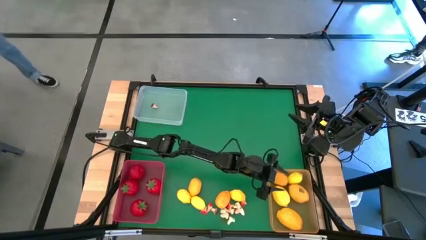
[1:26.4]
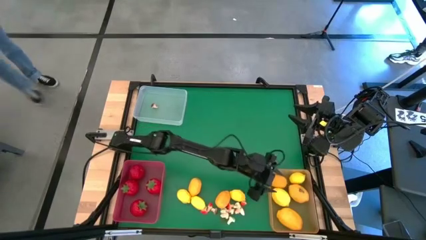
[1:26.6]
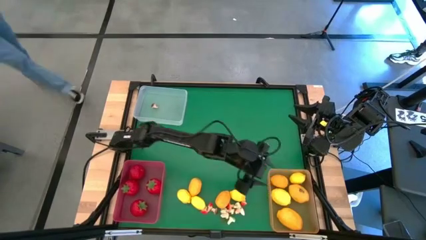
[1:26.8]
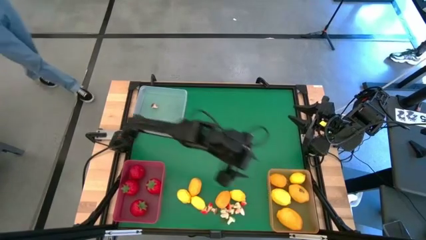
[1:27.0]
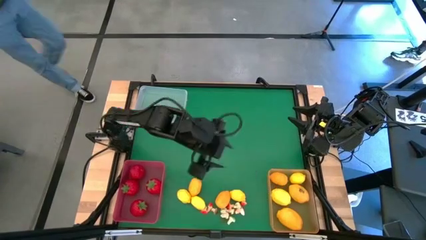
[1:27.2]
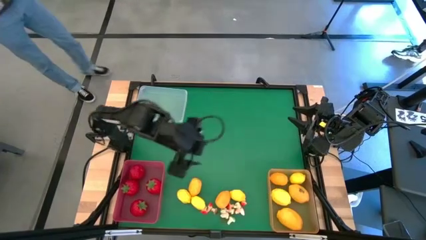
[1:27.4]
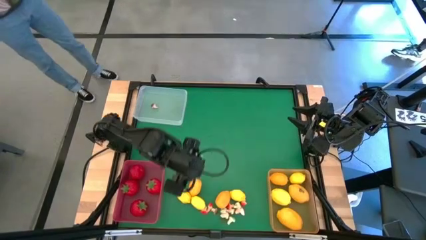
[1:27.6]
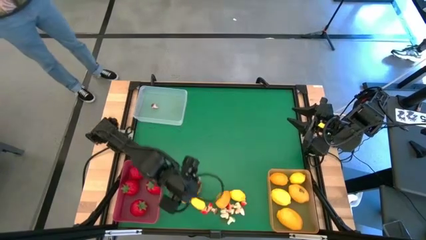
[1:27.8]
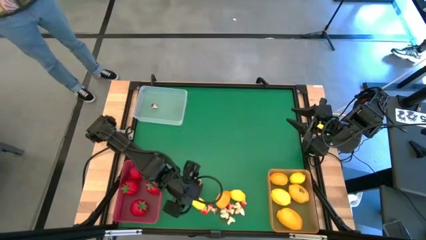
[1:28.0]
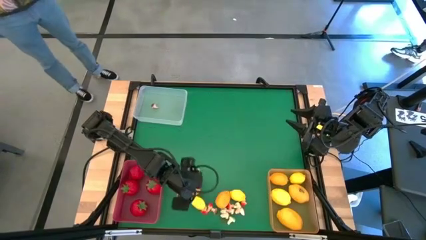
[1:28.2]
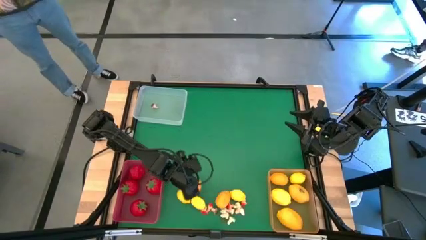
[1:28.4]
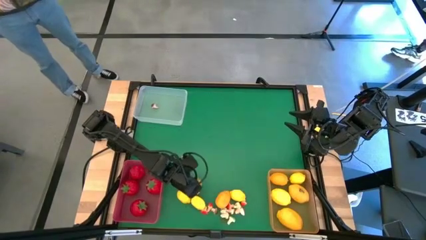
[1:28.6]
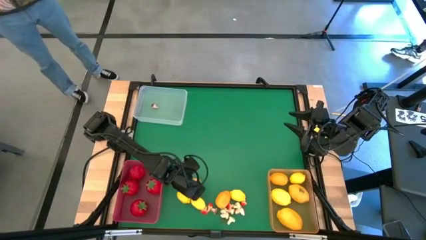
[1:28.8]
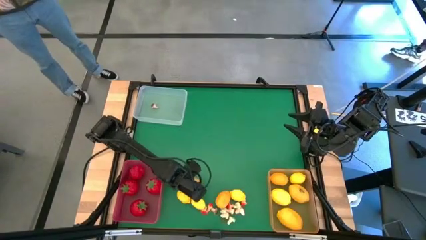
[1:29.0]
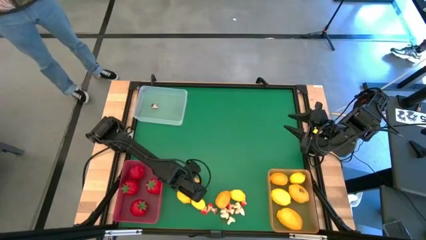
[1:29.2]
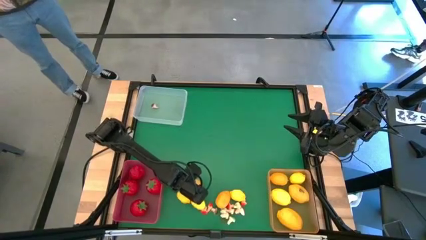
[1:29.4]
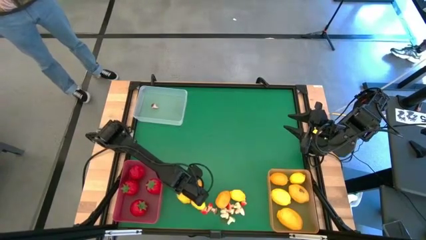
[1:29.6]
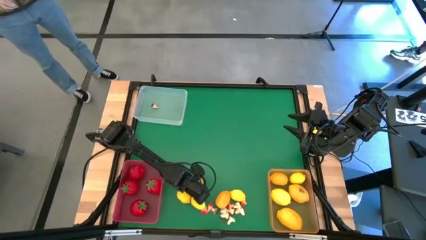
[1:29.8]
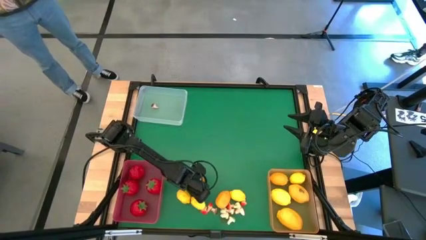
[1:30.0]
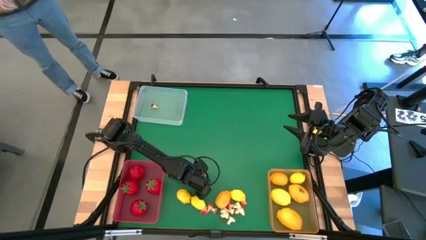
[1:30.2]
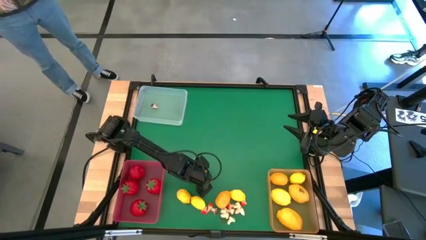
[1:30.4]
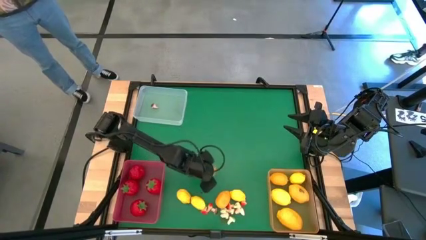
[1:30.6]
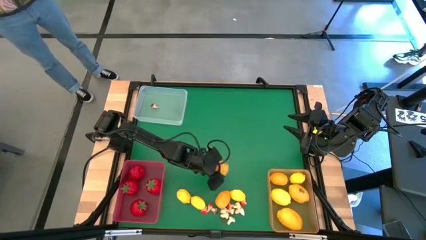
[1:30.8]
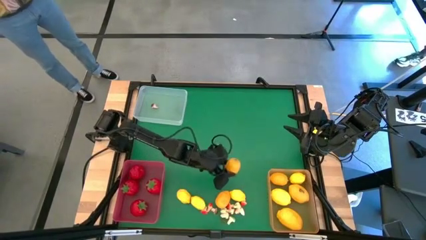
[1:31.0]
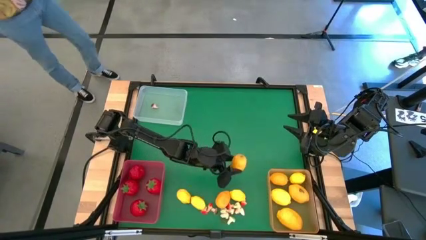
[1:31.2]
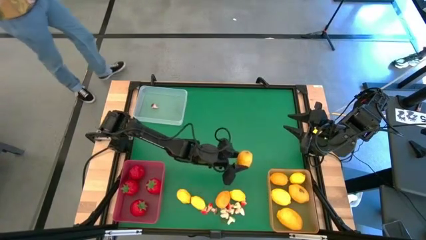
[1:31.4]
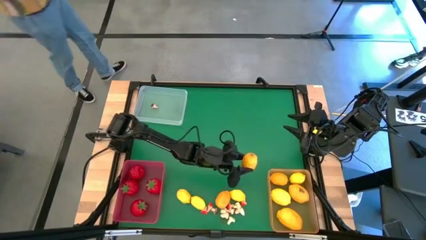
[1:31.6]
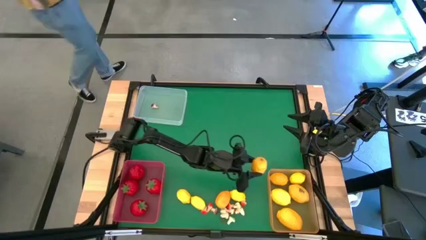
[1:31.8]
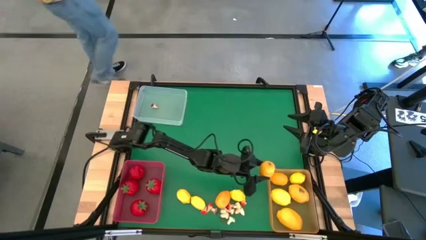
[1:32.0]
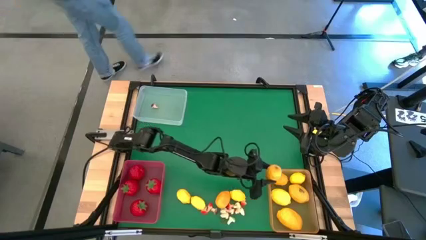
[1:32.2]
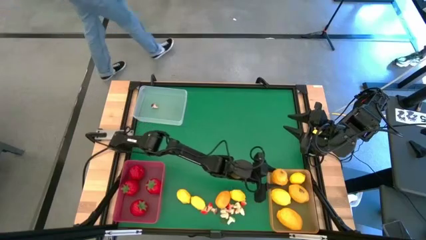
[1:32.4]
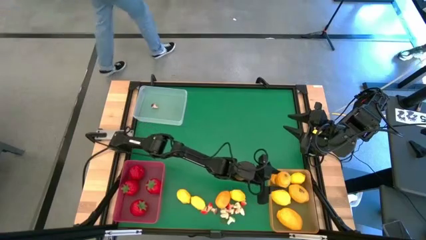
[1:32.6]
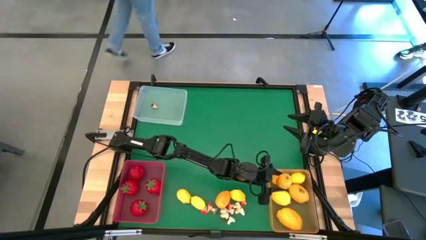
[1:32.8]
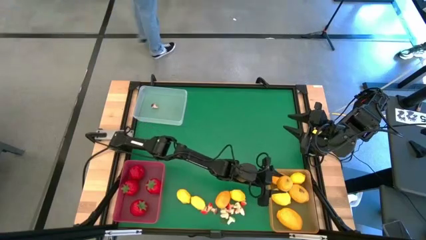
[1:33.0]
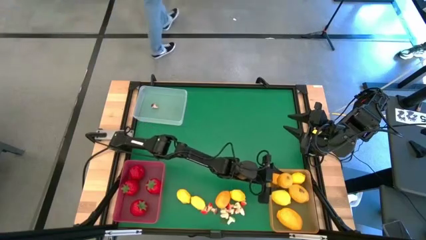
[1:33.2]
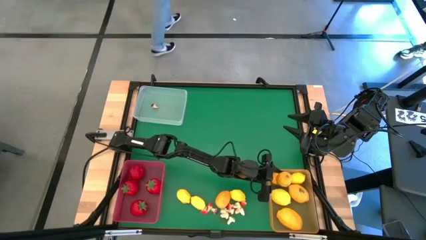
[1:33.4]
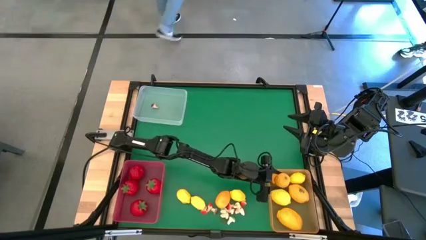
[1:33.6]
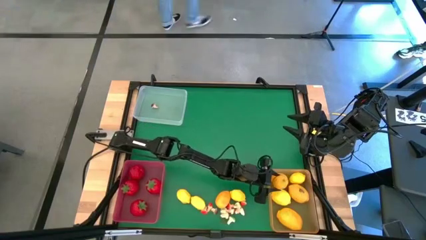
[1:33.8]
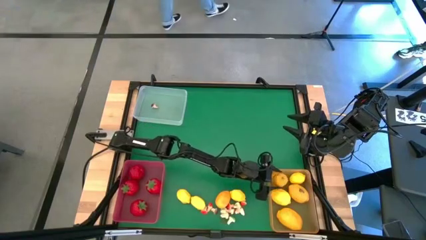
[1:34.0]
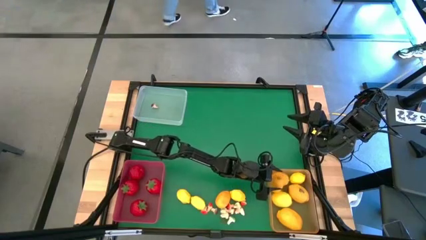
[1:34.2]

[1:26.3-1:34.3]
Task: Sort produce into baskets
Put the yellow lemon into the orange bin

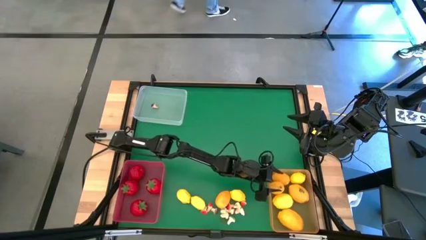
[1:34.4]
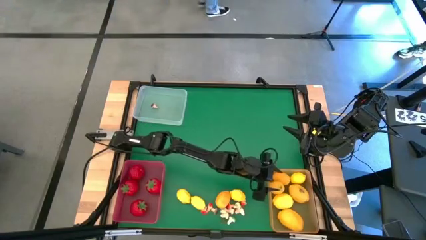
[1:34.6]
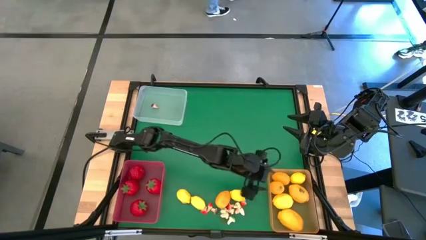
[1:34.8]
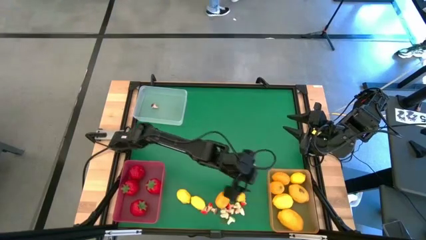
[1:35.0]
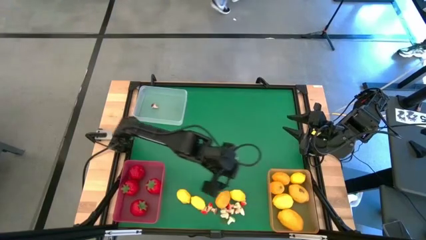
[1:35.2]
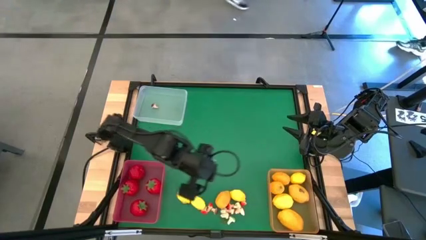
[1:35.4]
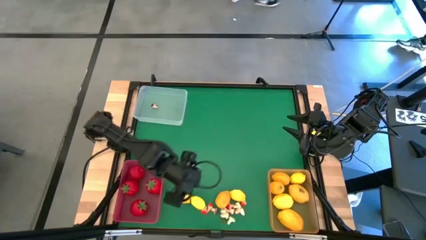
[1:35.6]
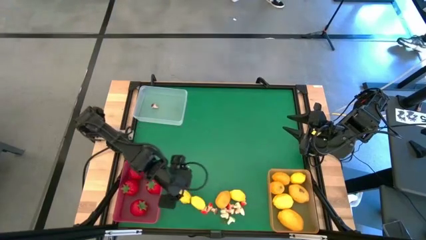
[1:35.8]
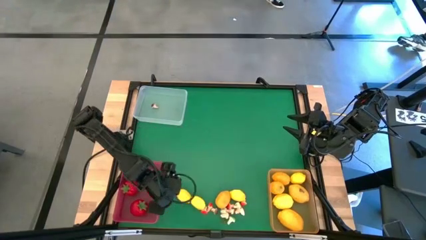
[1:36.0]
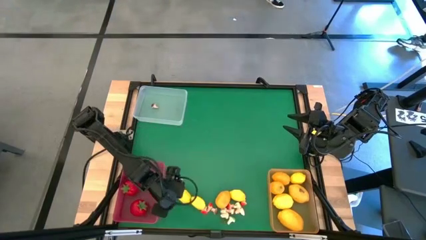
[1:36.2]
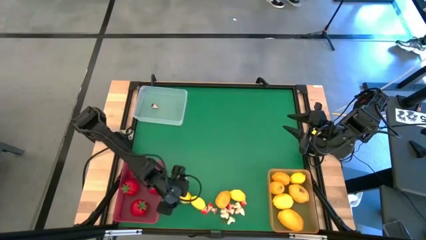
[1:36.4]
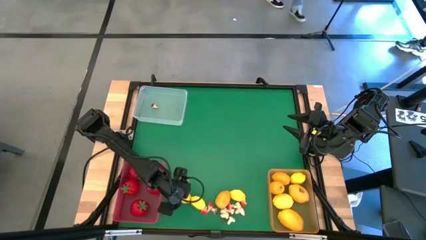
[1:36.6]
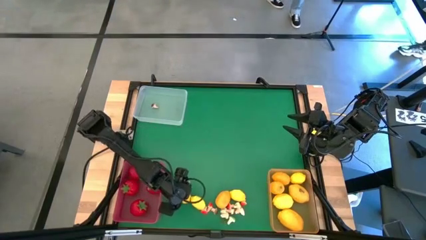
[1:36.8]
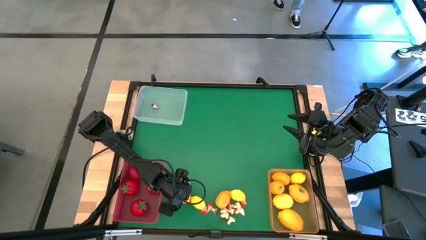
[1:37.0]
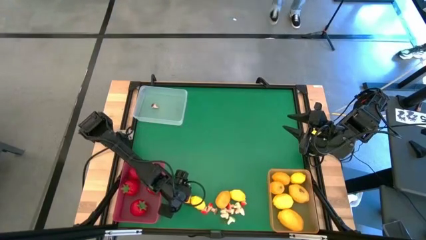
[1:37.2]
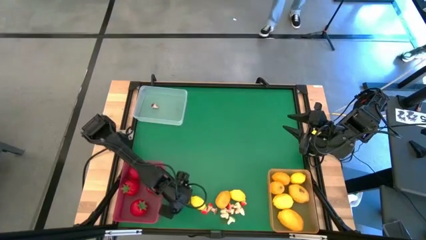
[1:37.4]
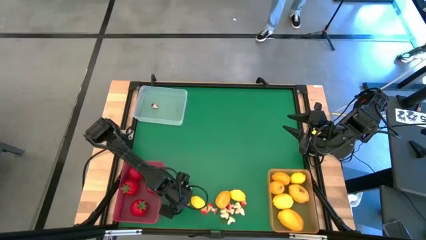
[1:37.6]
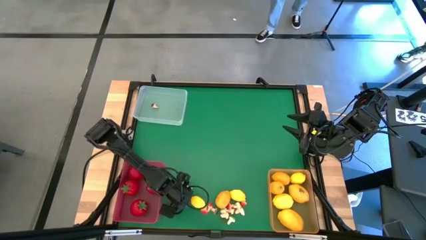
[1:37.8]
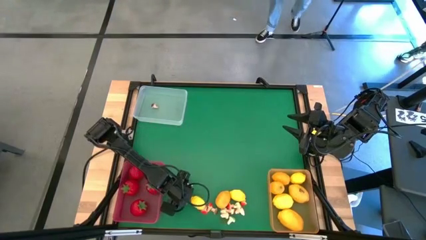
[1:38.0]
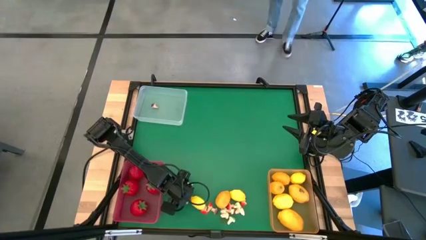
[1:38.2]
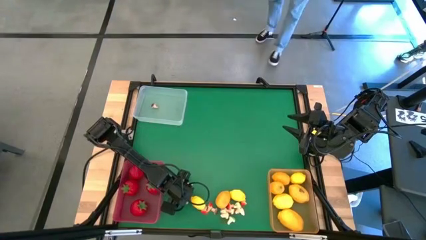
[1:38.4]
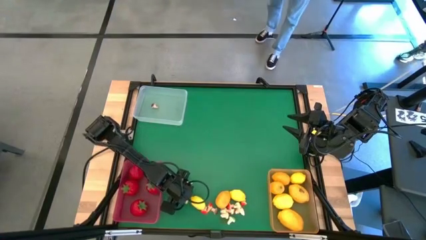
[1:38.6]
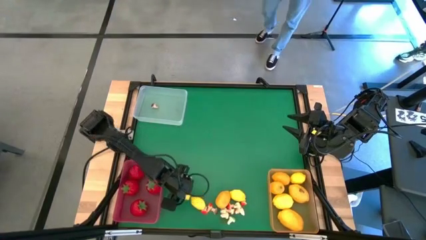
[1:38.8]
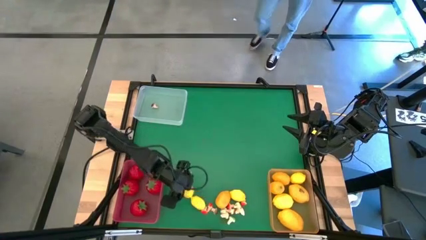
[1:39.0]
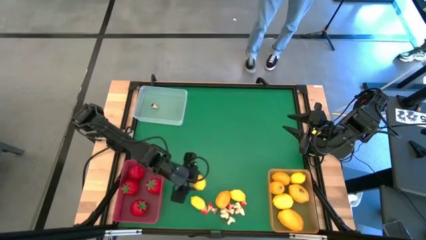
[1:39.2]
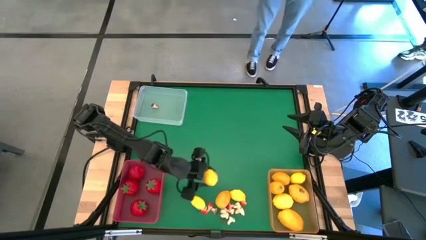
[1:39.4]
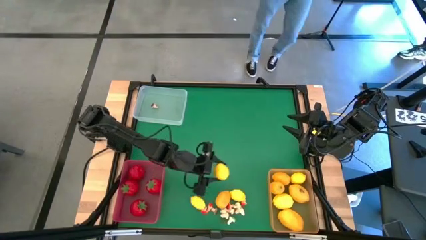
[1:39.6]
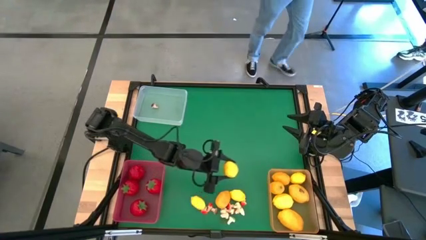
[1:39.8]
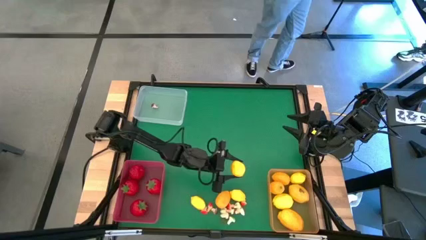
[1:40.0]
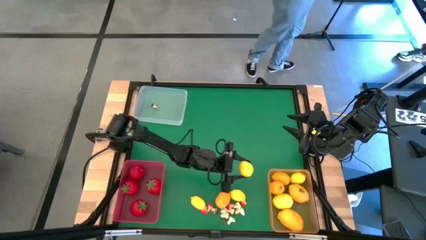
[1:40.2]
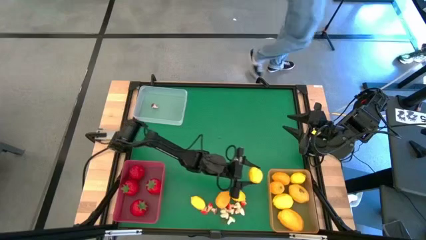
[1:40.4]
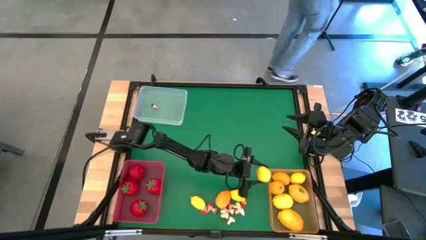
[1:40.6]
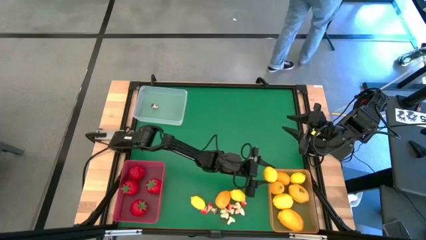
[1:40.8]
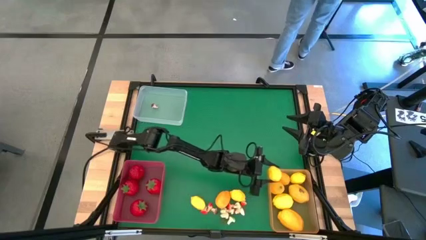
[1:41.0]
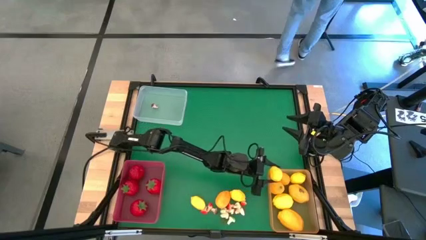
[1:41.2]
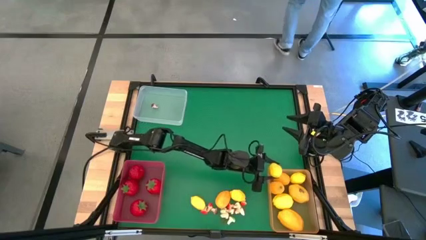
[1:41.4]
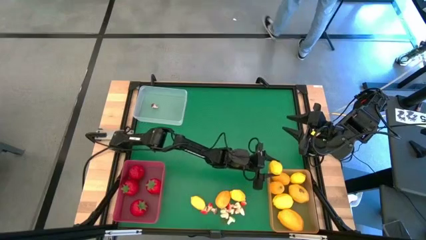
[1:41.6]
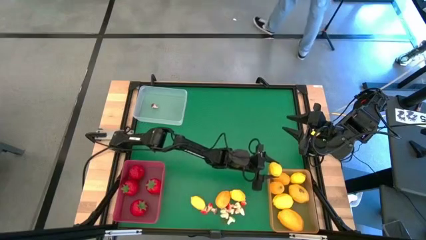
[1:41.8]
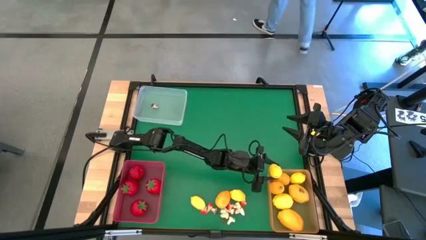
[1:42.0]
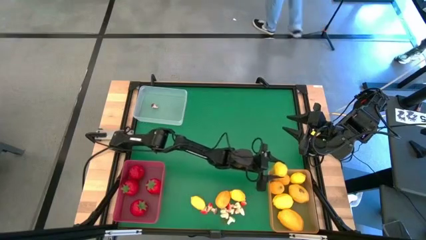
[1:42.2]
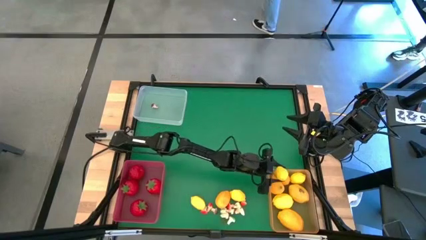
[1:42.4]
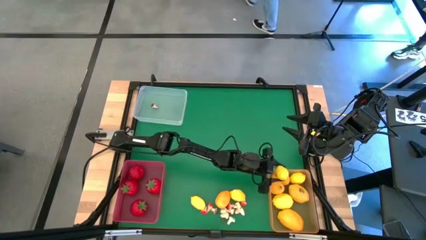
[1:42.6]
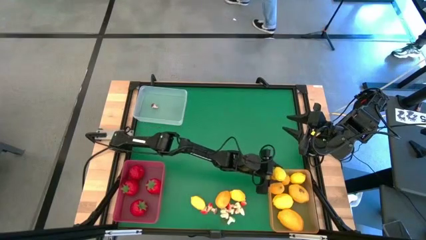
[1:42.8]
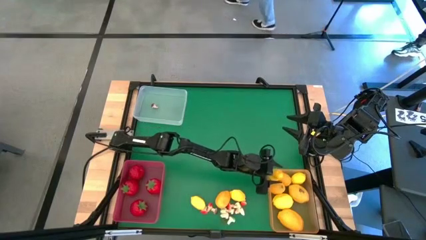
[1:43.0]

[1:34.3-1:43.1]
Put the yellow lemon into the orange bin
